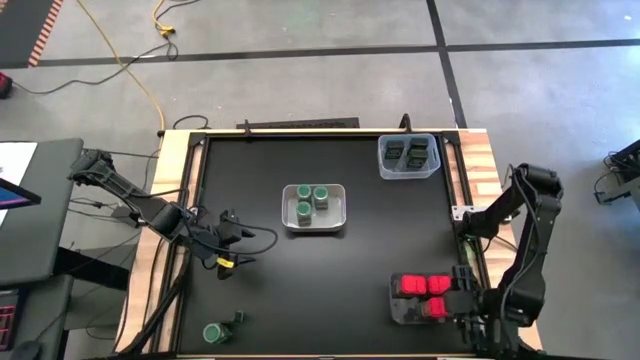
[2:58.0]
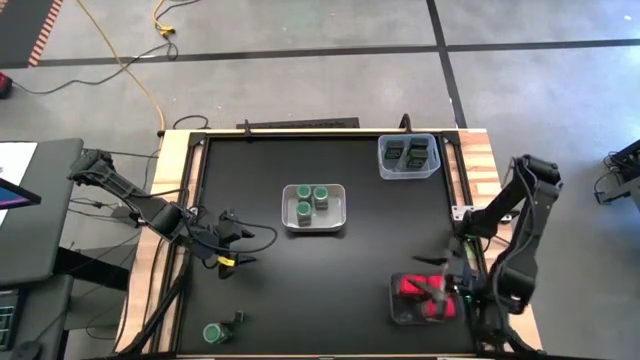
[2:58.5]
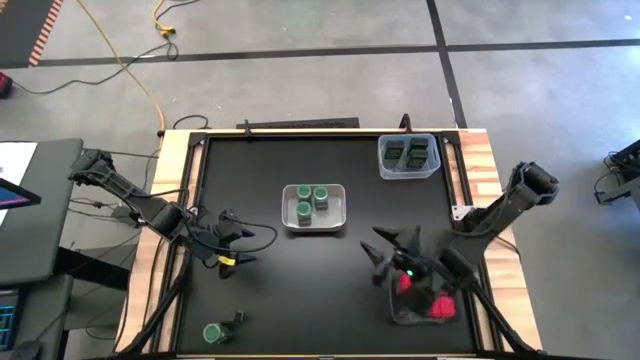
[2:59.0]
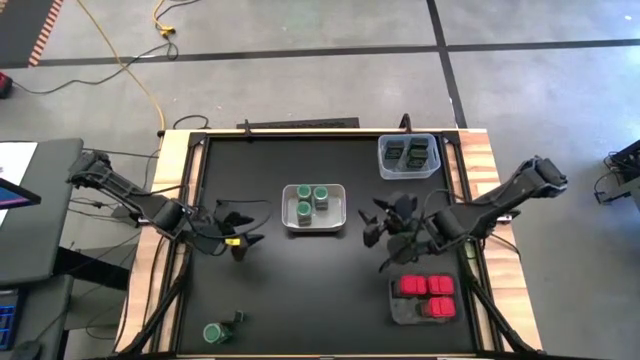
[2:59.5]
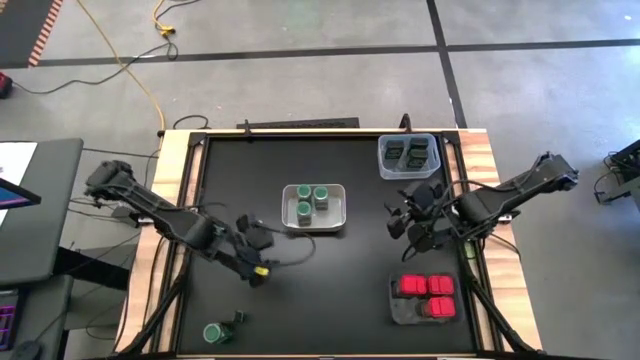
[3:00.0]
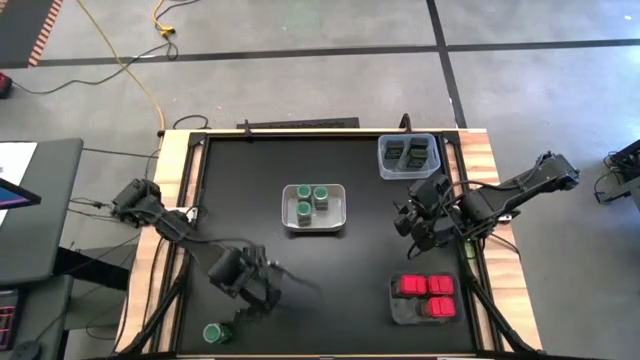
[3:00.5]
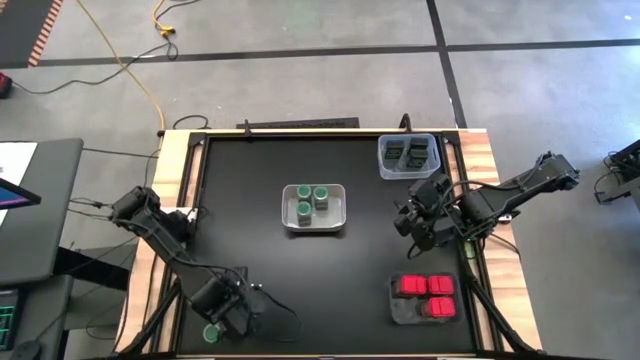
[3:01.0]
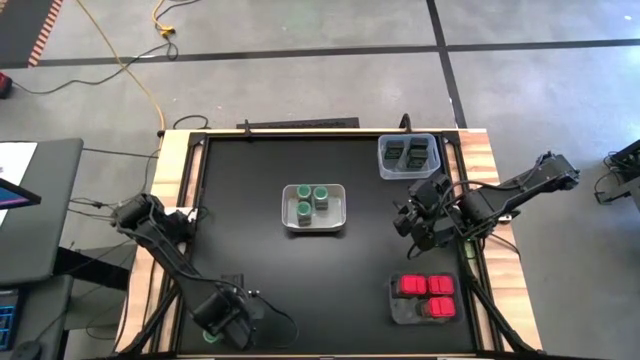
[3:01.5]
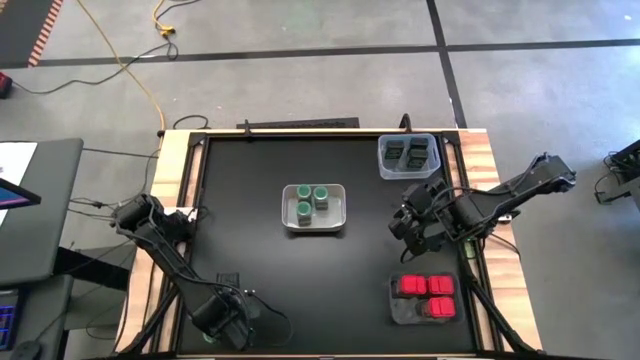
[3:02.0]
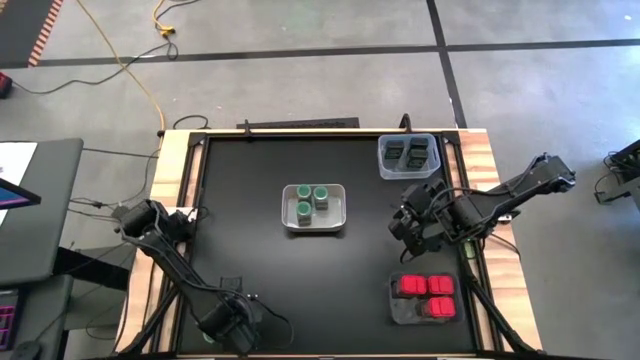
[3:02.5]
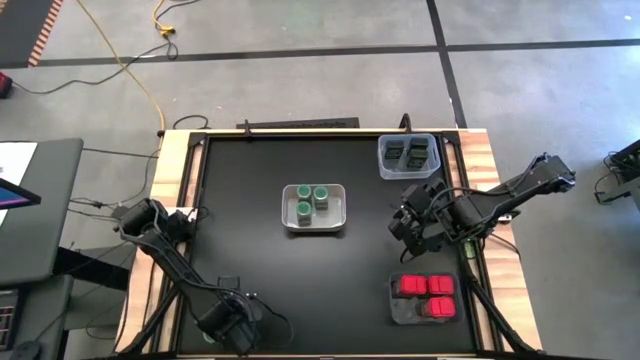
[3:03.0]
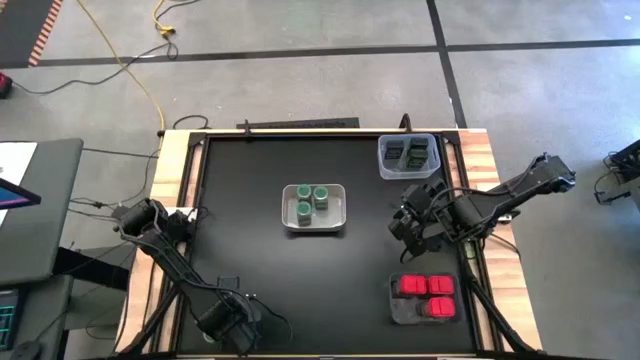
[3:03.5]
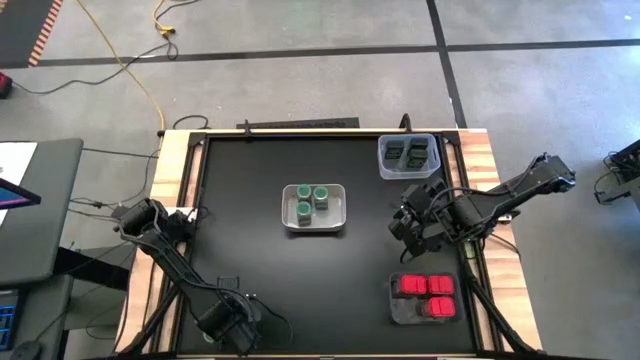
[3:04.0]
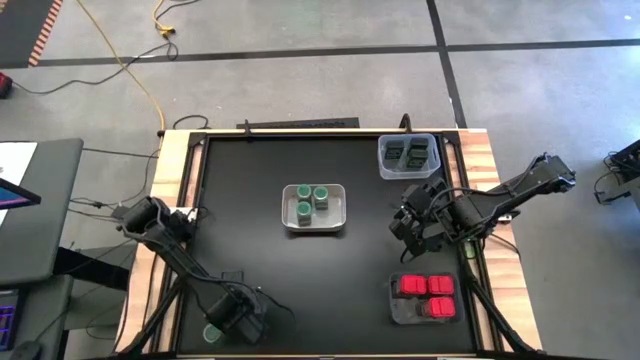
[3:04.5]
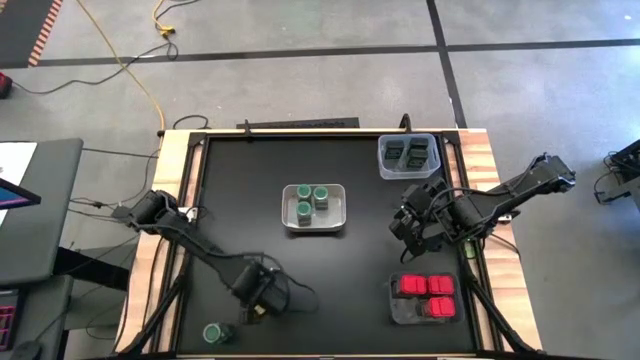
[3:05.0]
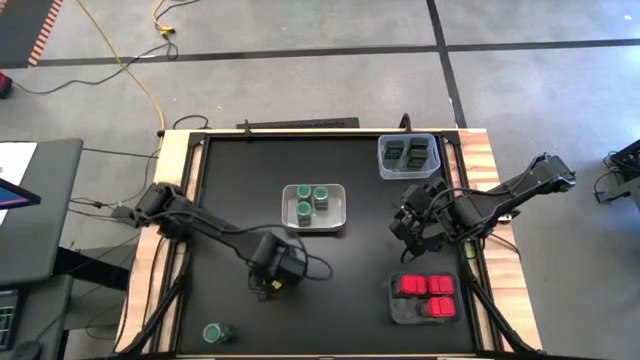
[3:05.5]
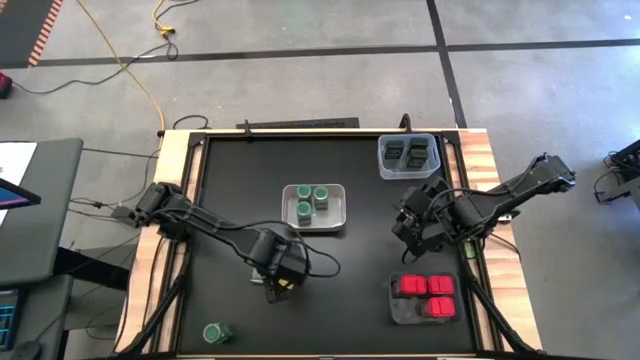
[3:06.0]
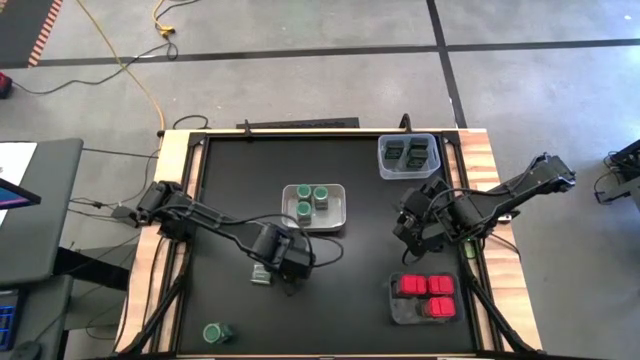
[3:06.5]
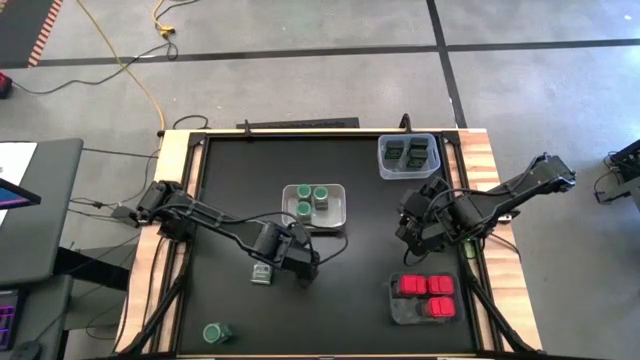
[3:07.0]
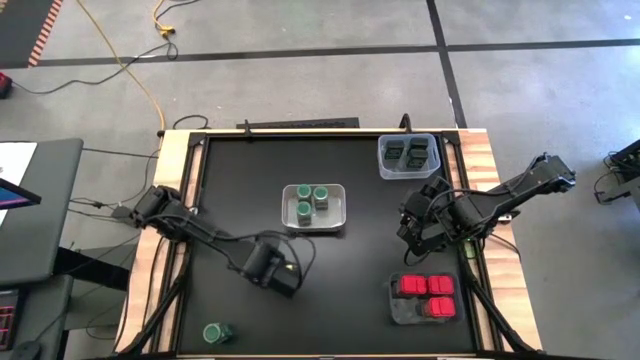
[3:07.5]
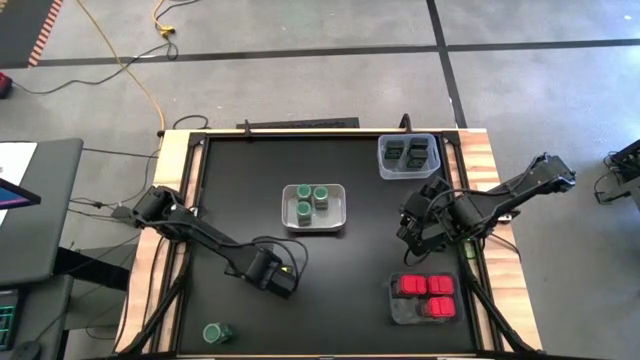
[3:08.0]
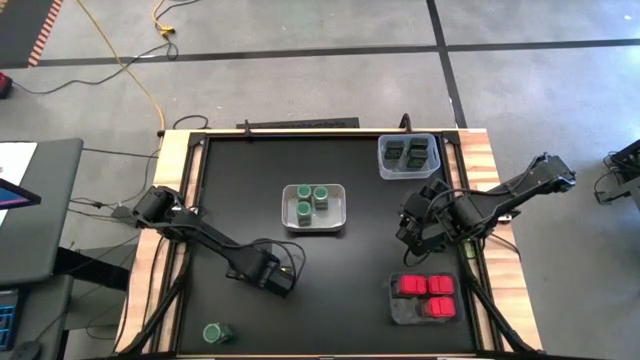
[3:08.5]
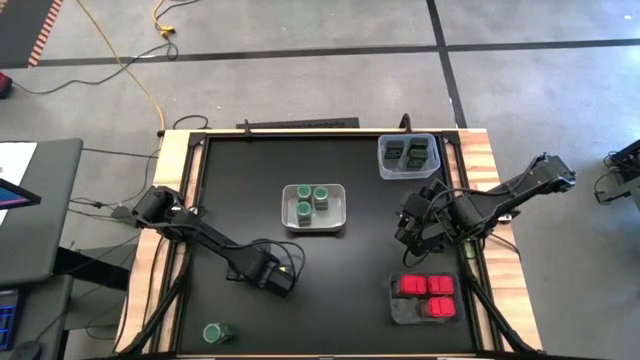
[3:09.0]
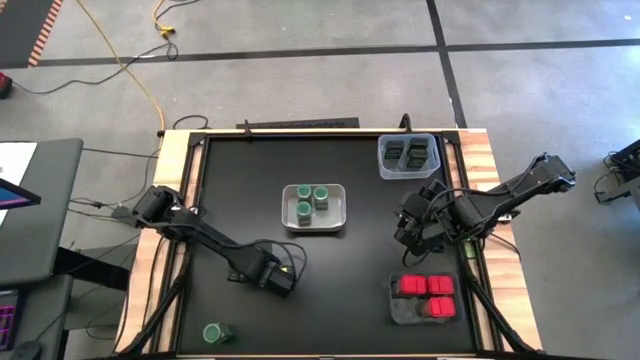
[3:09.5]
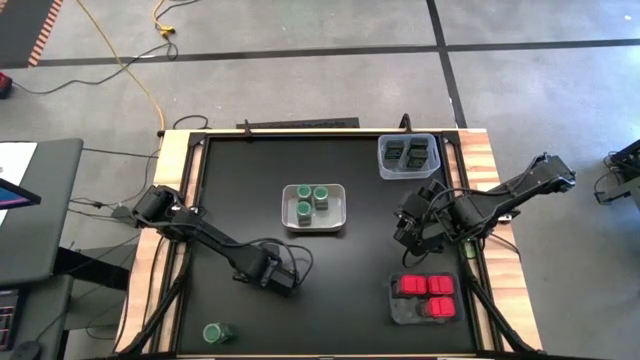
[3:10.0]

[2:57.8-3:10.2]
Task: Sort spices by type
Put the black seasoning can into the transparent bin

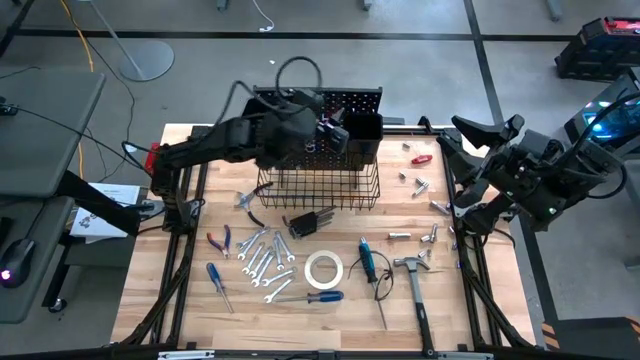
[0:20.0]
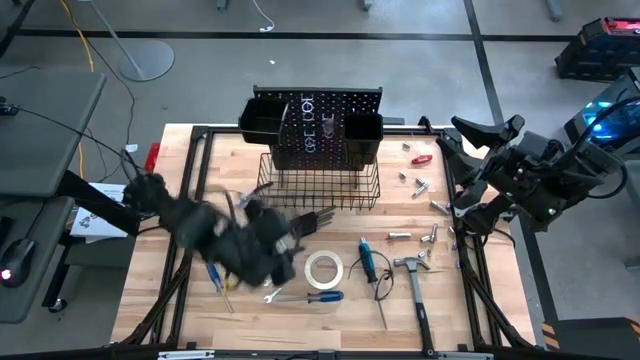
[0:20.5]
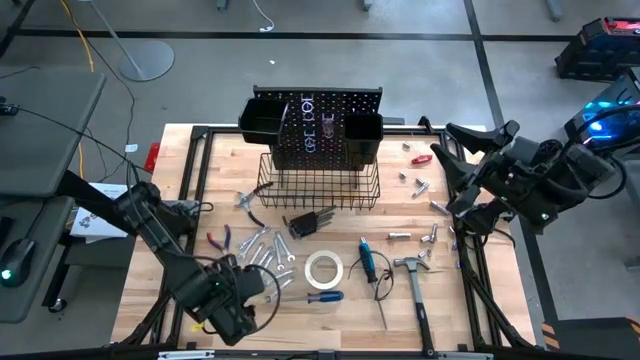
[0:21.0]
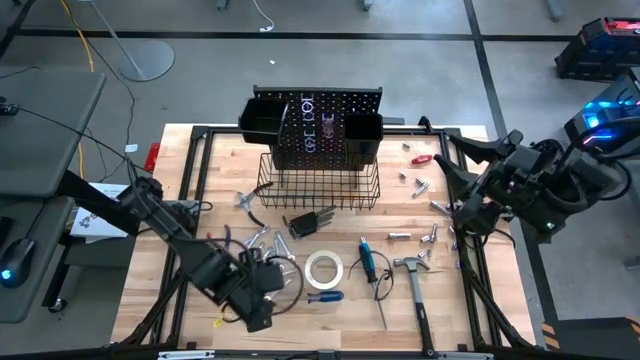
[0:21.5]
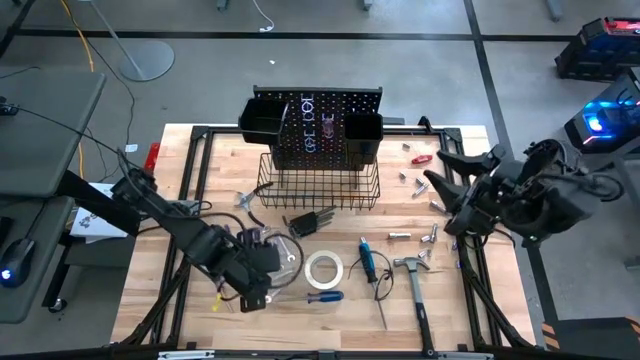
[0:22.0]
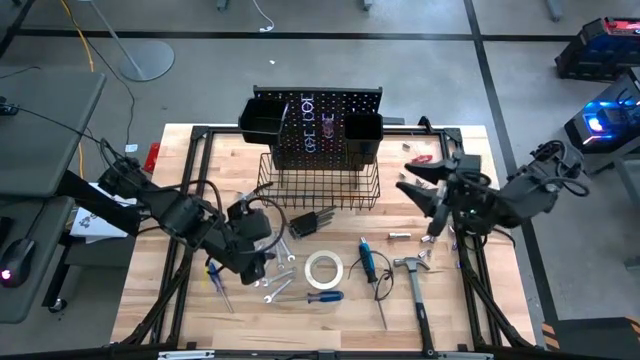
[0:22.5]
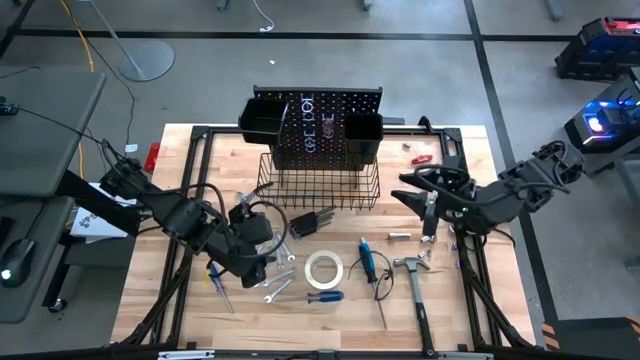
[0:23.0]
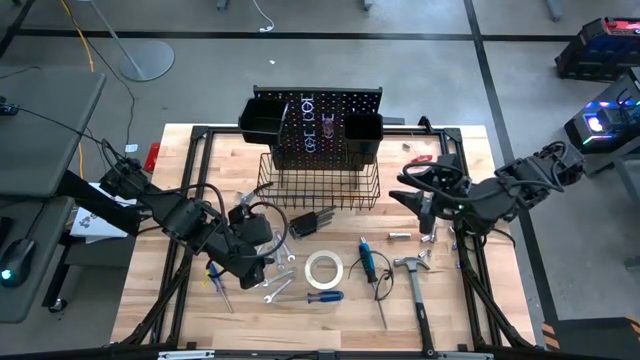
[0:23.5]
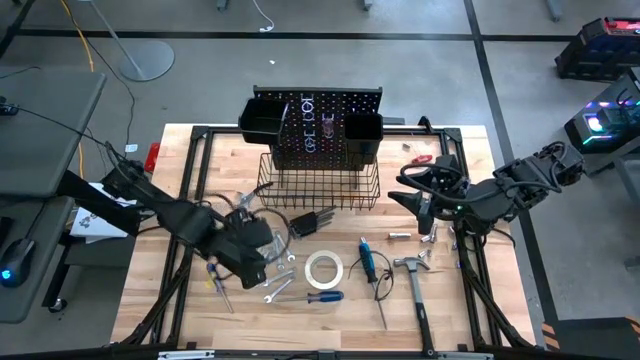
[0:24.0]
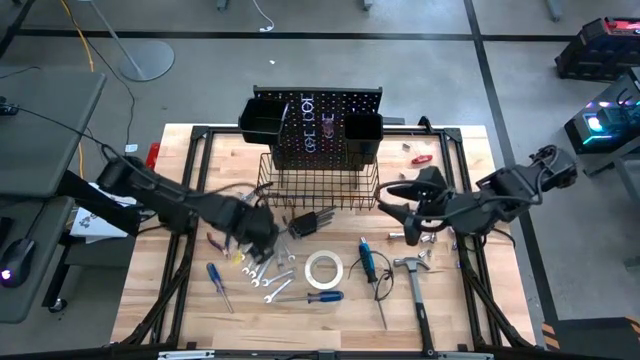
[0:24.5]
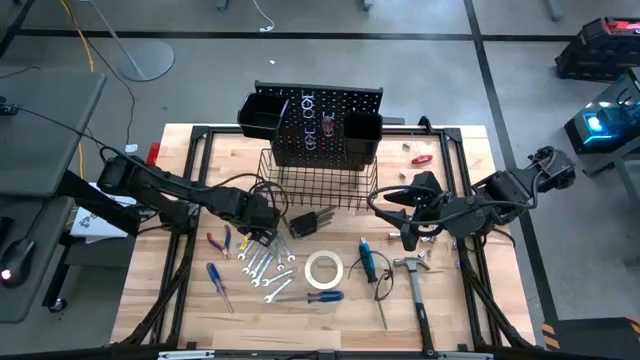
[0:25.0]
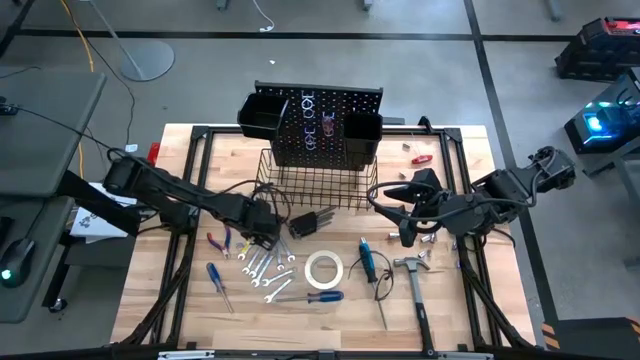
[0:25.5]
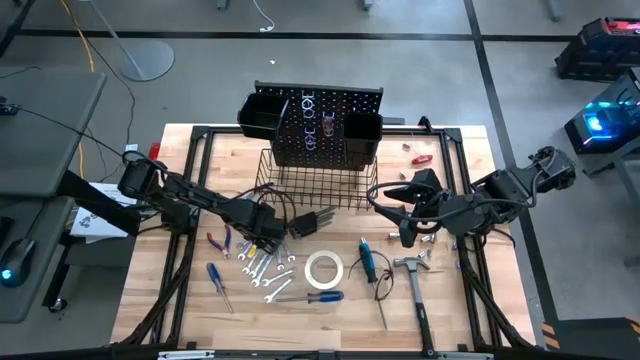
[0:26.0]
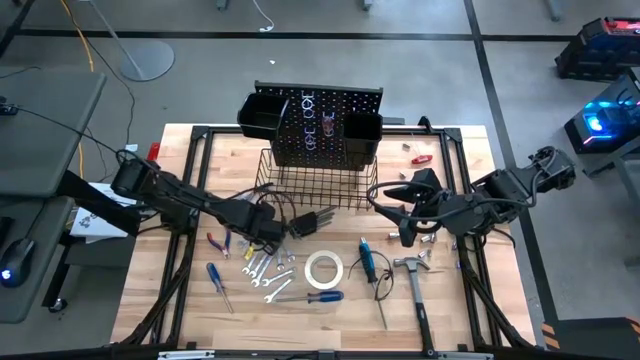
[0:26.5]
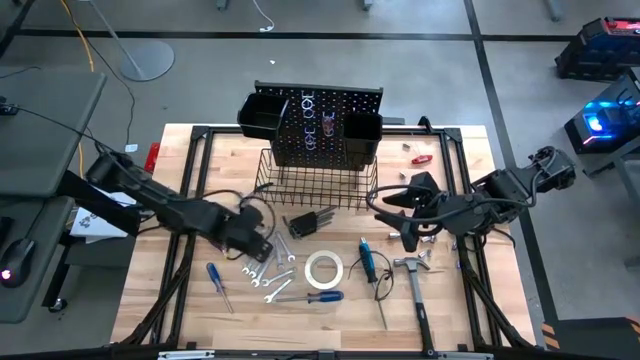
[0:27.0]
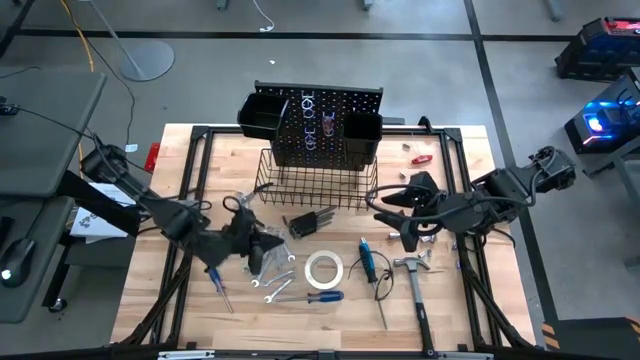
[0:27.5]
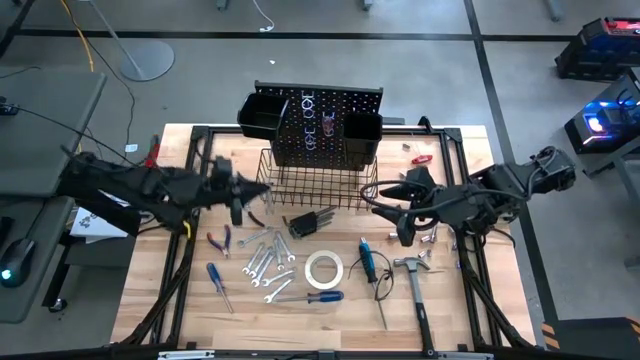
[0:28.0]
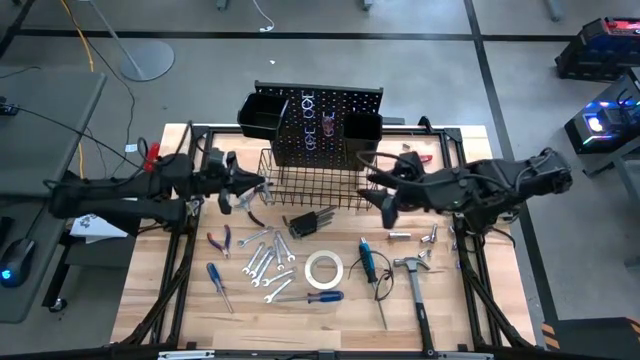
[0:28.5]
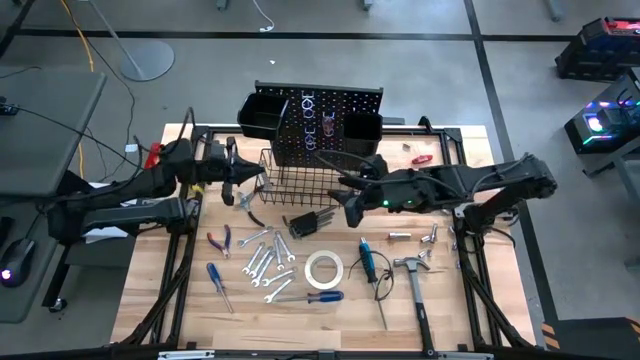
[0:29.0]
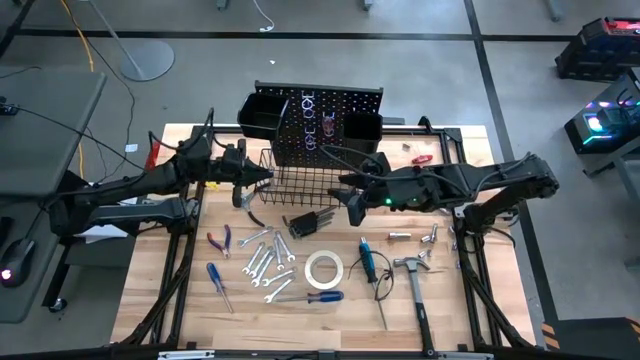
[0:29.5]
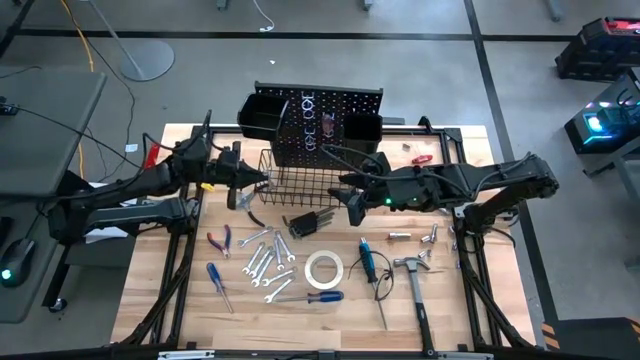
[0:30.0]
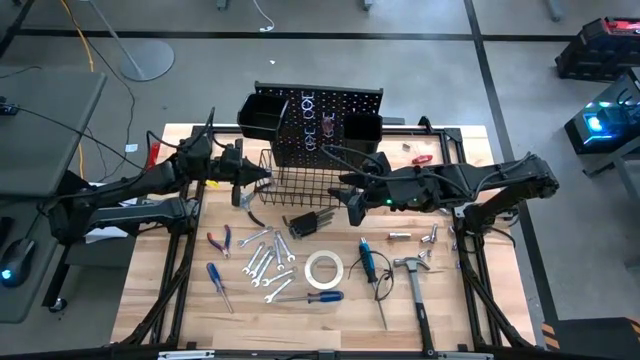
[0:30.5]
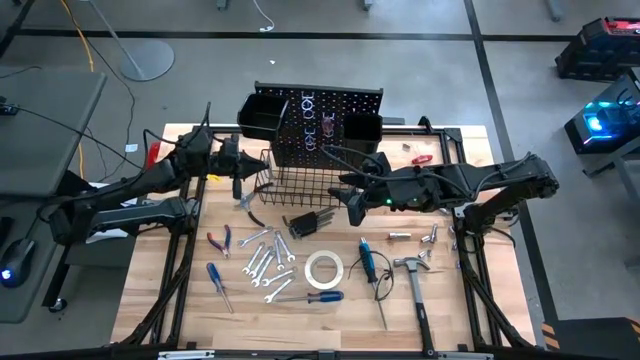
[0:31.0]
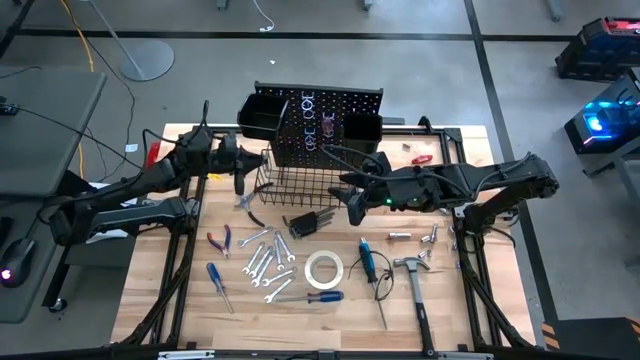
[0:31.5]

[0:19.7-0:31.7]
Task: Hang tools onto peg board
Hang the wrench on the peg board
